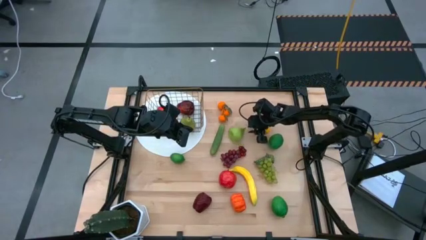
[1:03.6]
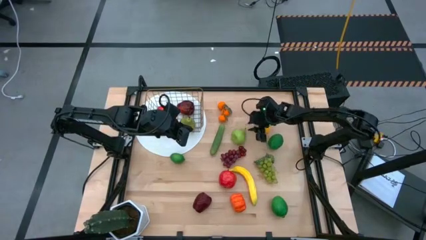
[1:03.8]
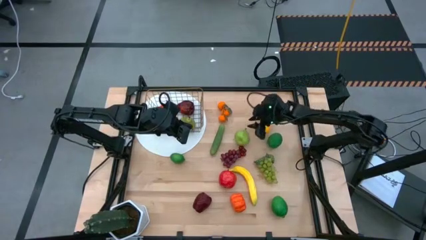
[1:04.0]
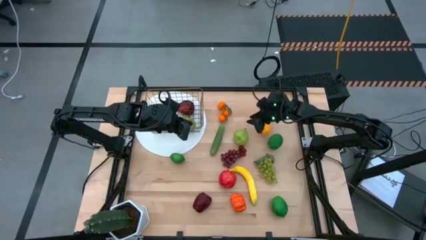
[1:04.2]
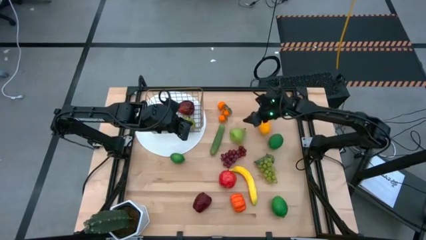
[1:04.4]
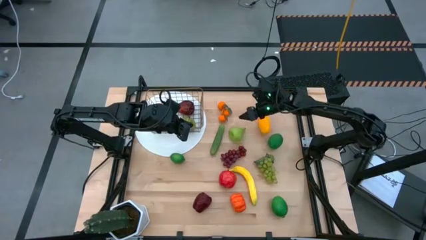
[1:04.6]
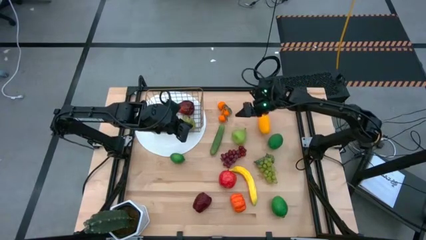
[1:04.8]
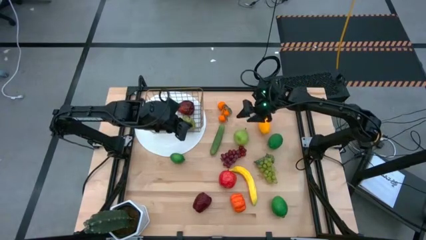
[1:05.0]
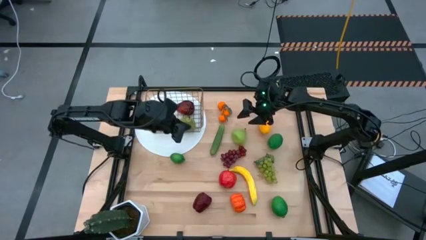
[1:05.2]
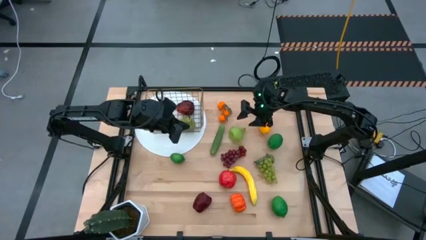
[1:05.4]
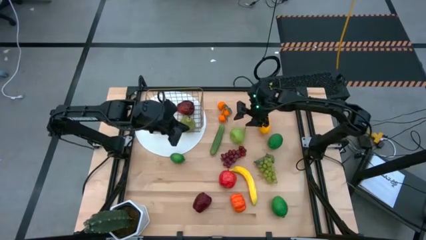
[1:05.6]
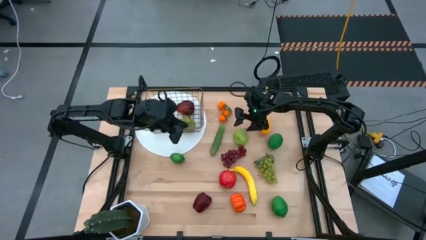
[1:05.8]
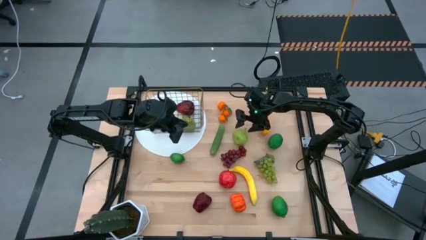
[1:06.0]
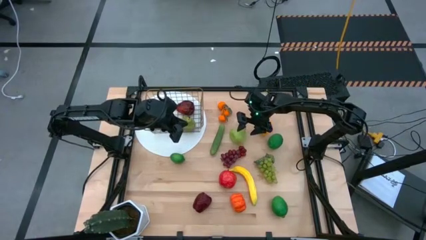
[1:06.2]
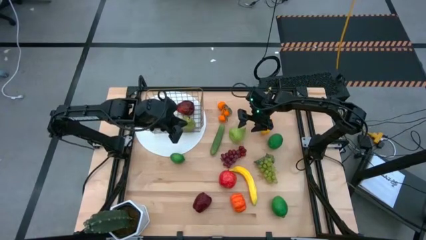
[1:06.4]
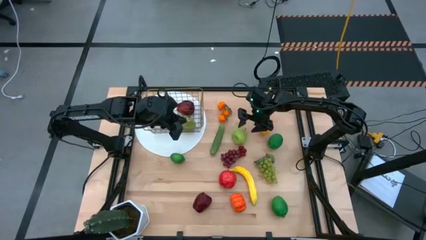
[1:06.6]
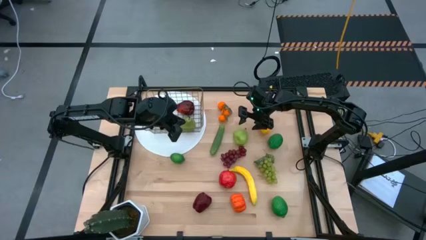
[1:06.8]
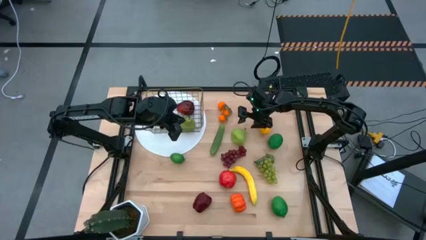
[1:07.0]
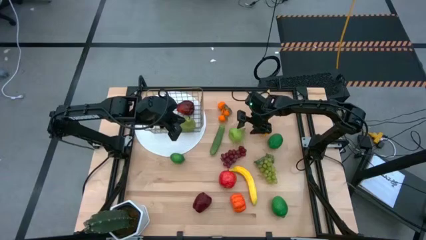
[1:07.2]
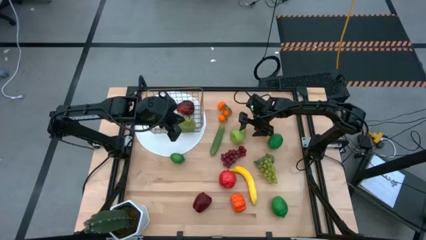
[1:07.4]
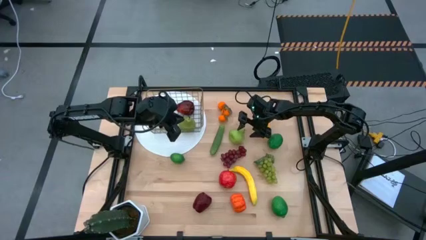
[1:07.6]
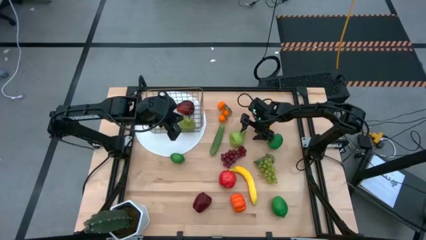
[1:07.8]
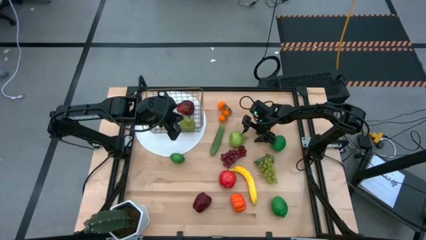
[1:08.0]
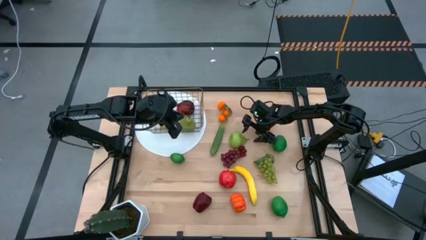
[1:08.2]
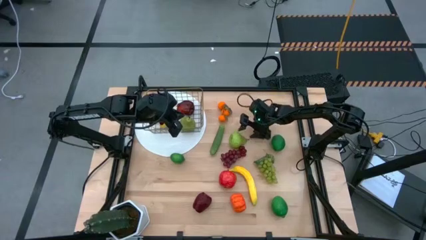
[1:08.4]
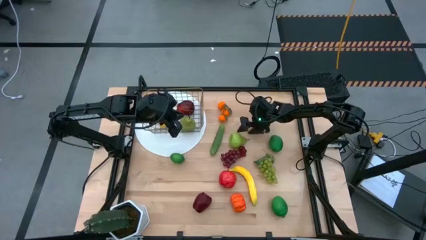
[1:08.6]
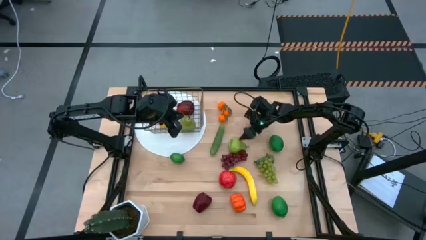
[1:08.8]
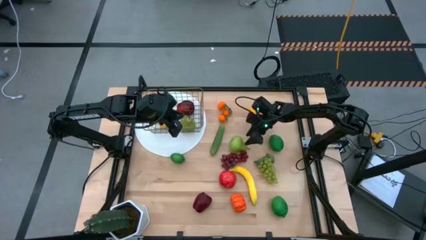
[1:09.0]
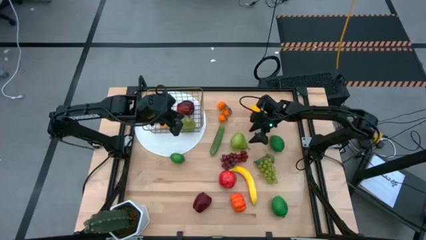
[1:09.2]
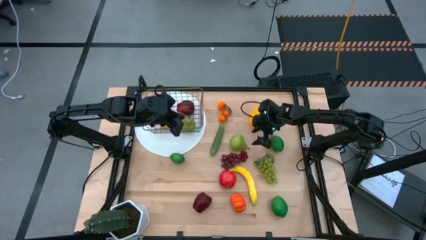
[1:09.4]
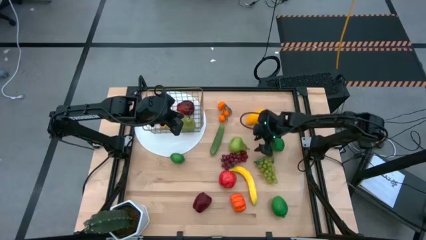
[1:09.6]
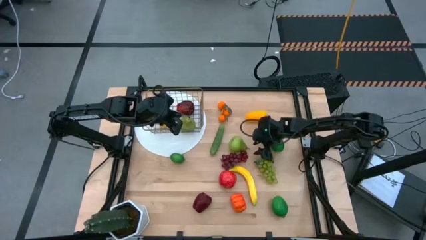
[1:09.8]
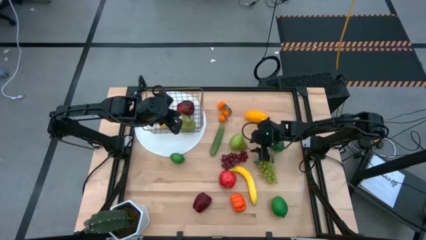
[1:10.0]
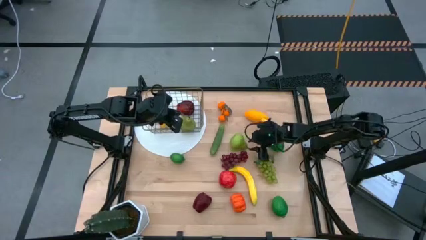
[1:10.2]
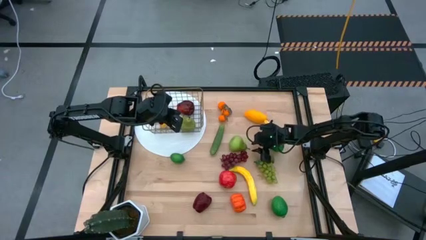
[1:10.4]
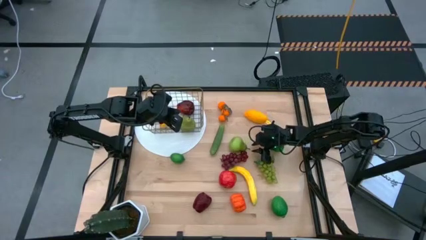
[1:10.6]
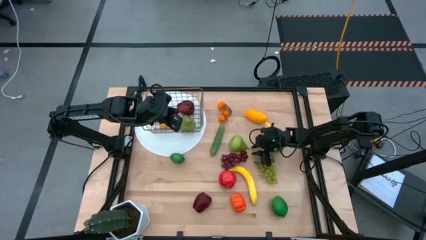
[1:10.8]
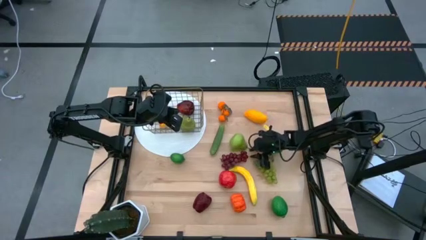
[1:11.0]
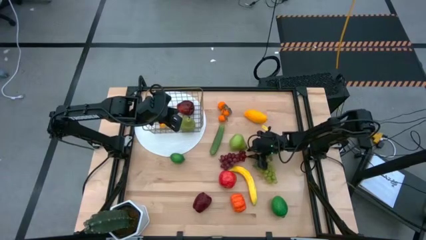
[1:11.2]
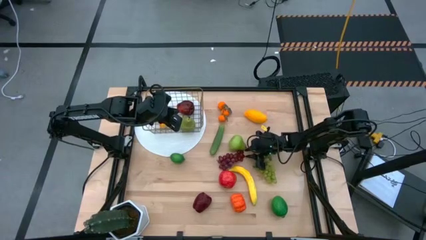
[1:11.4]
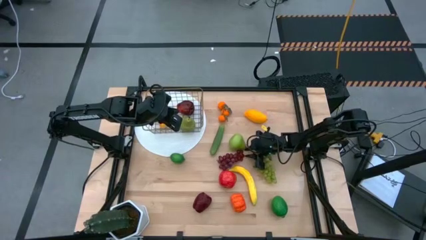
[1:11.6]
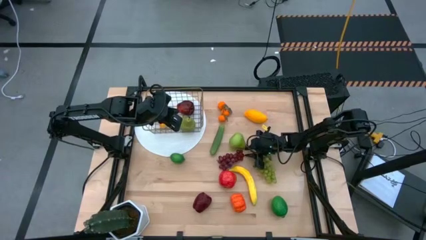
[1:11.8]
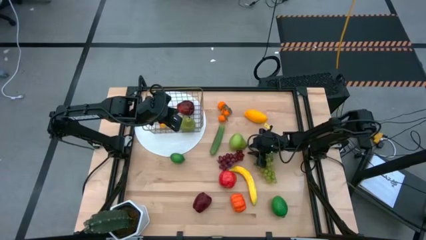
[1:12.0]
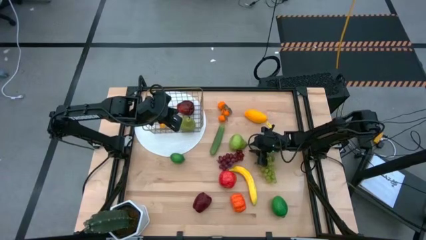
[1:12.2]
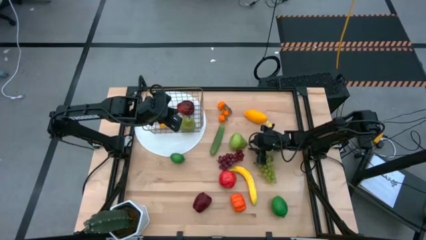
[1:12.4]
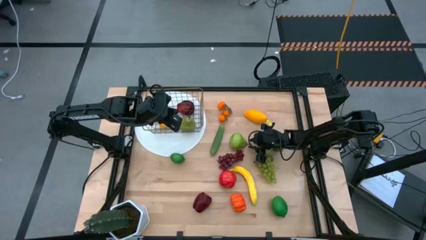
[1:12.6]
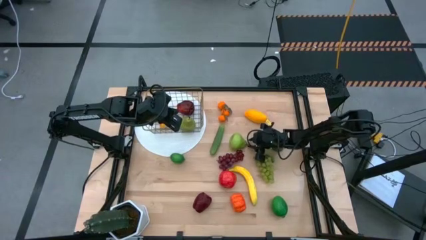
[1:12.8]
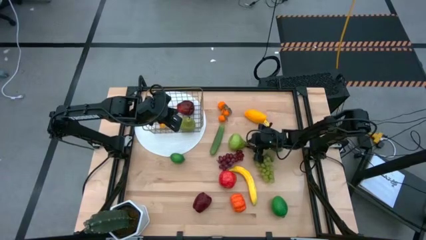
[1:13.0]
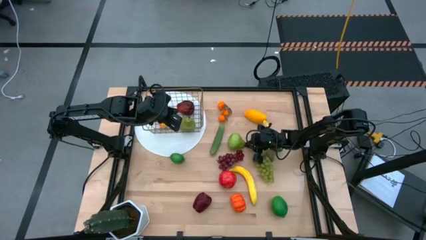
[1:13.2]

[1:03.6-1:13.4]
Task: Build produce basket
Put the pear into the wired basket

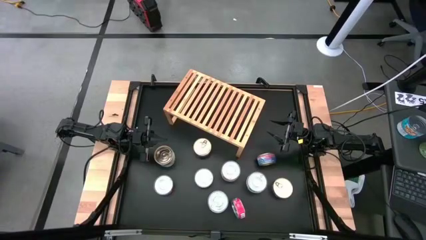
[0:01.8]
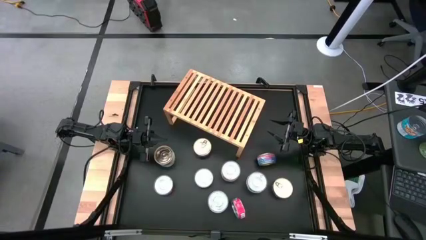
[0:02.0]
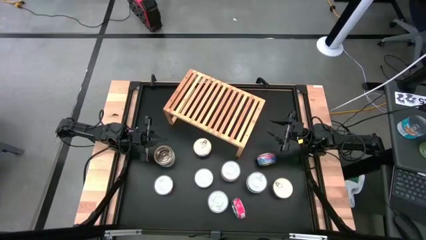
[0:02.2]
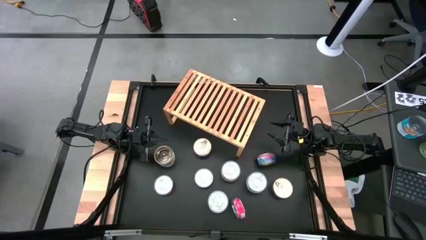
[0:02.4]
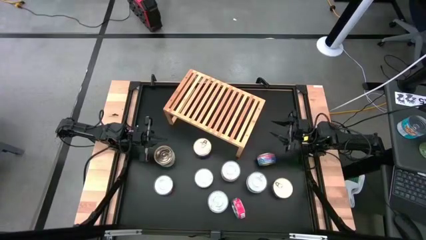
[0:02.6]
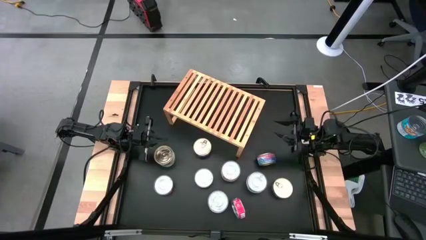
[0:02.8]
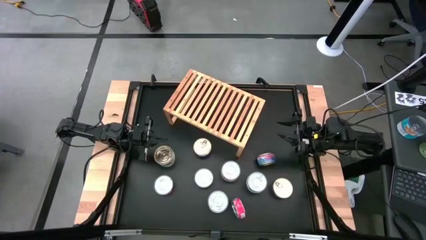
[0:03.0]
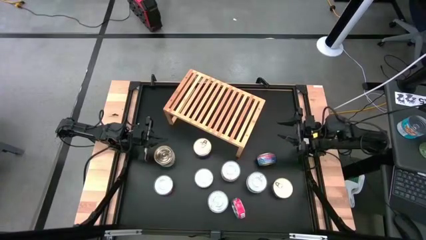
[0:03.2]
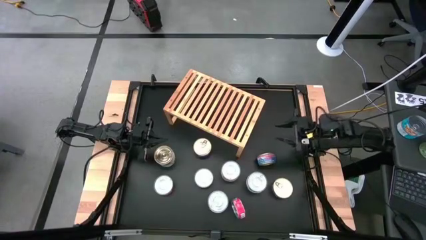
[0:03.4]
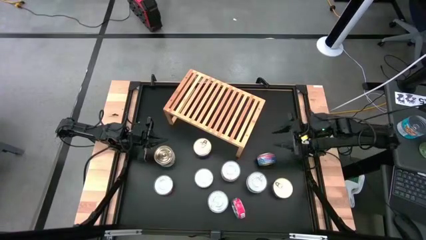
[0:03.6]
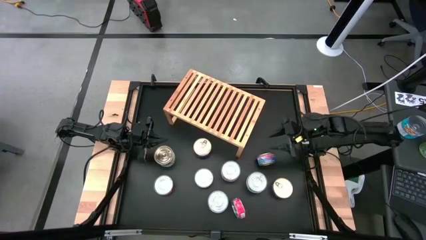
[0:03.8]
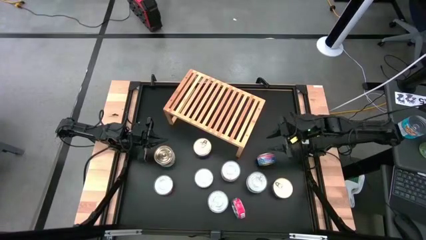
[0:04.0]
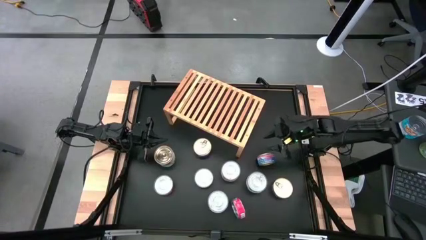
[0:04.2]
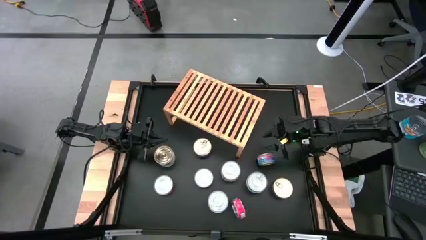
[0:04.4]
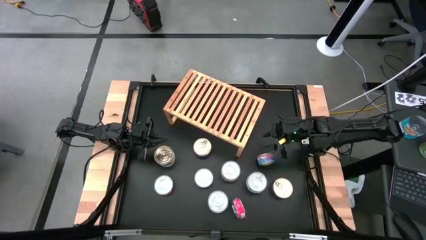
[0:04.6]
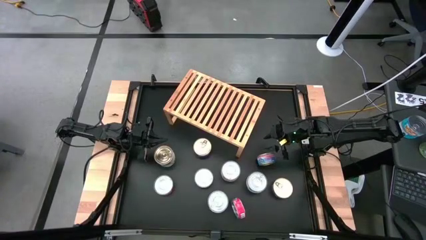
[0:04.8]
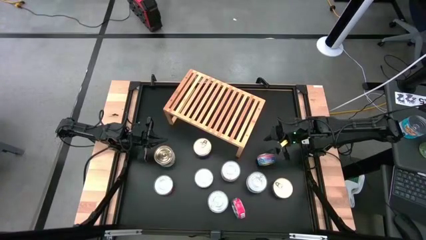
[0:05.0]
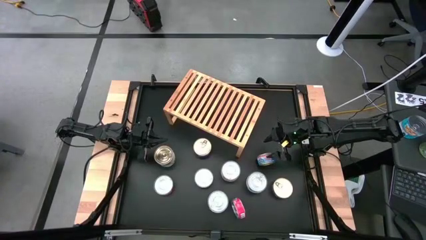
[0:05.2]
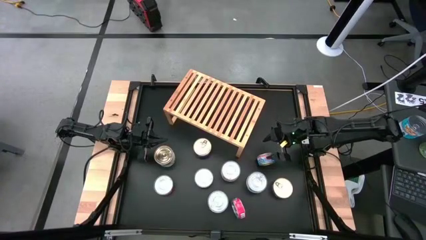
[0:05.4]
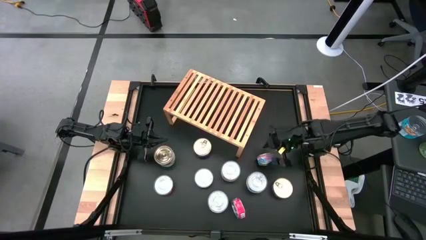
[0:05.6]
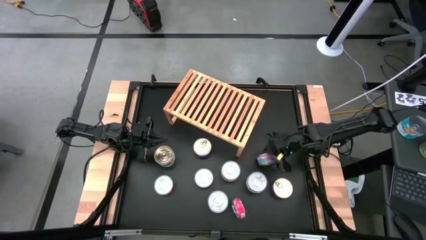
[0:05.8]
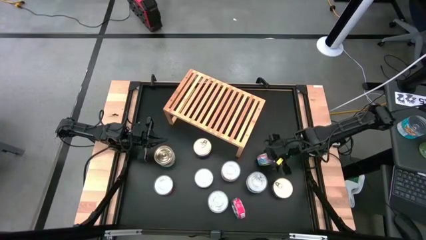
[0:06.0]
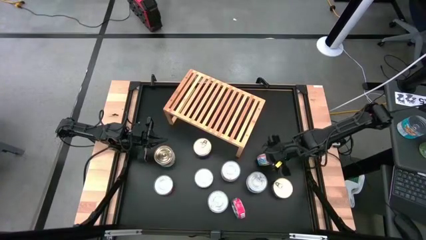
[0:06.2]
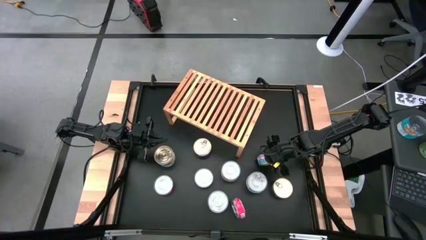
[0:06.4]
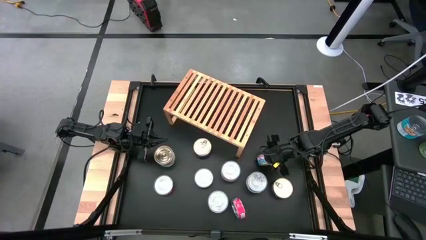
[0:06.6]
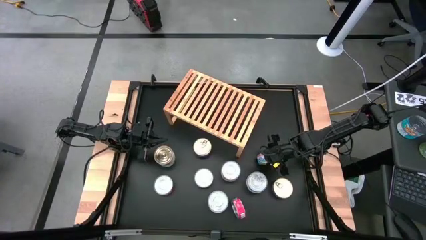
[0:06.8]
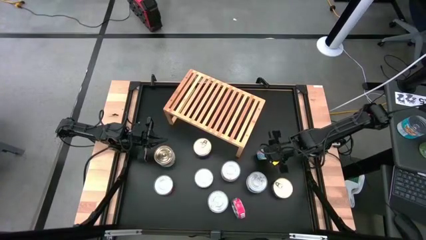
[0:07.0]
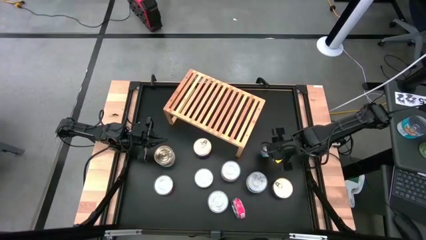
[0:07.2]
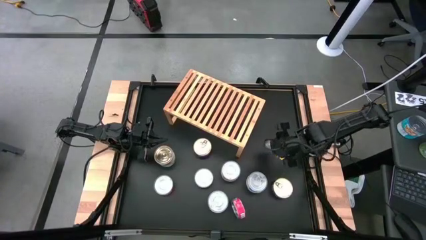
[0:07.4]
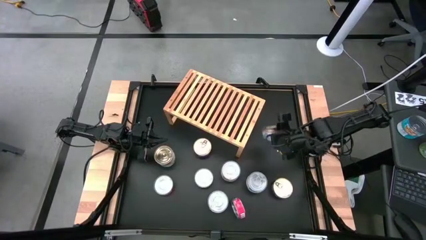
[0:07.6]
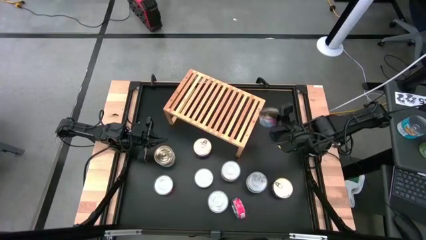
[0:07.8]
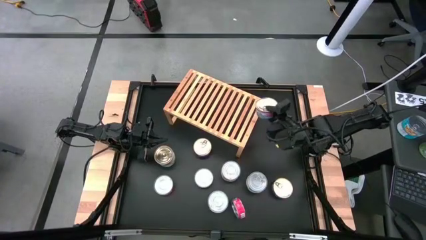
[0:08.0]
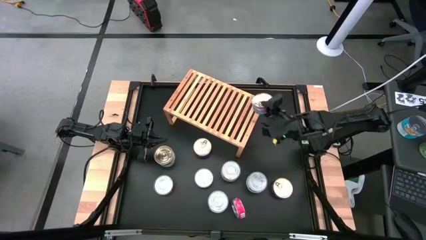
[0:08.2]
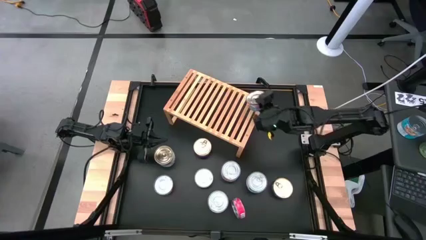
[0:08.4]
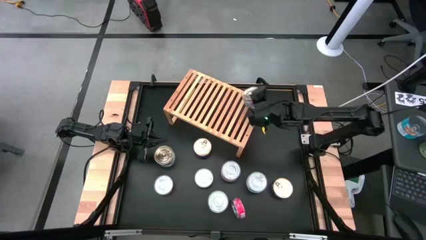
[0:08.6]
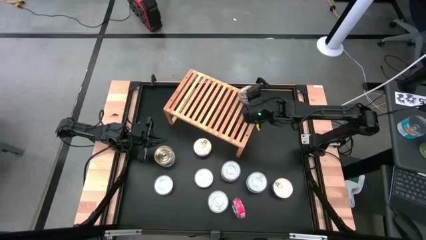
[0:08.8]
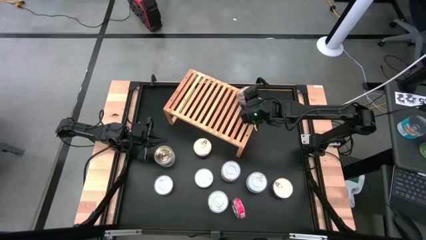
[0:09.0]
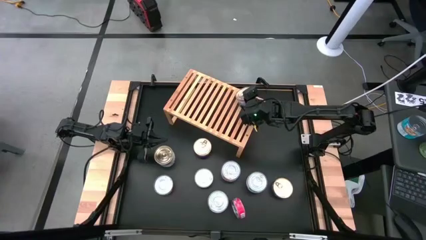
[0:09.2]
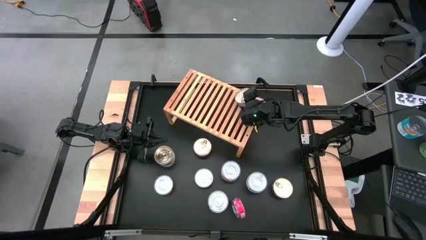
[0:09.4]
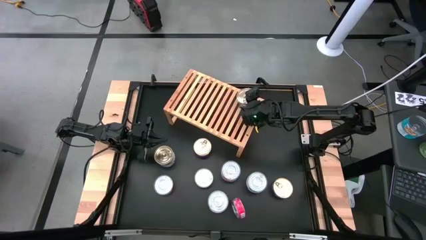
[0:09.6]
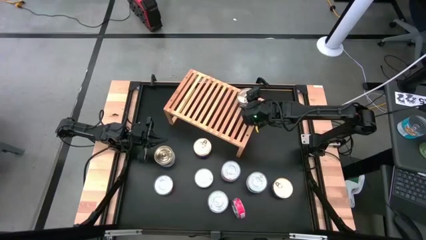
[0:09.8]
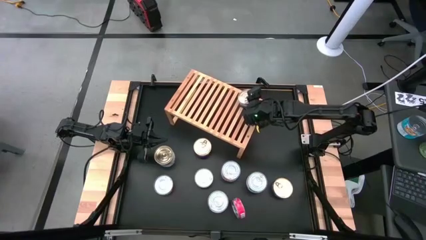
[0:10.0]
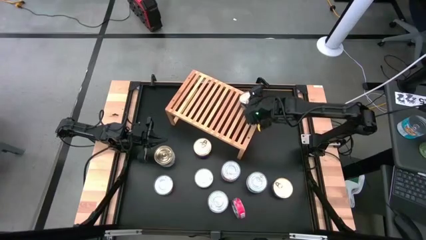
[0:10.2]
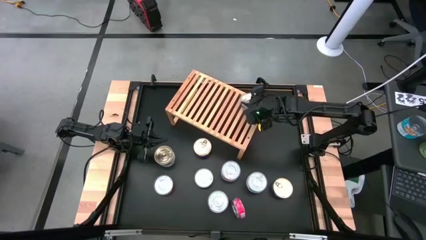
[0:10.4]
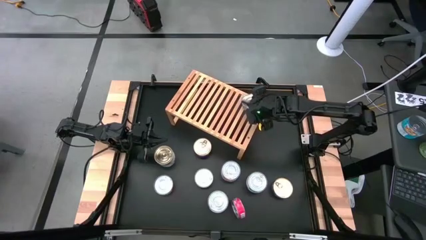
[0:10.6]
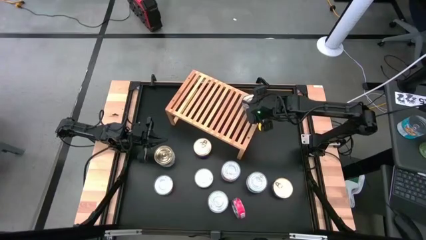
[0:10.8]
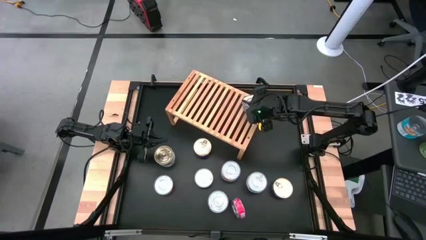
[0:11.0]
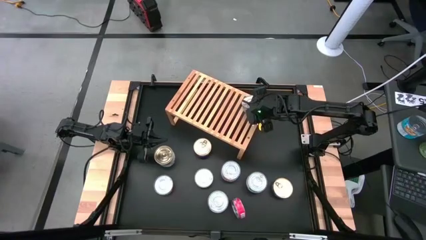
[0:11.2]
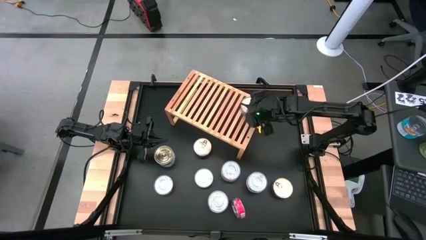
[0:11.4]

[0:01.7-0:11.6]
Task: Stack canned seafood by type on shelf
Put the blue and pink tuna can on the shelf
